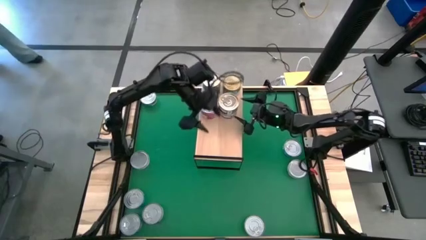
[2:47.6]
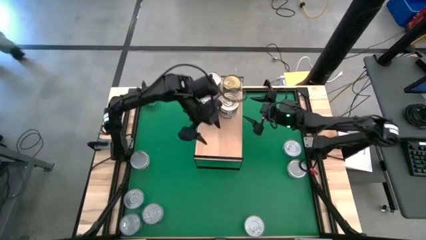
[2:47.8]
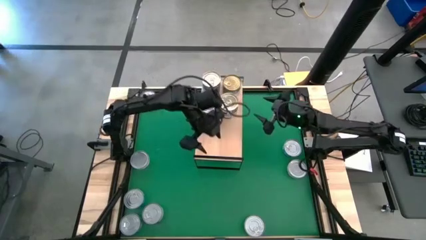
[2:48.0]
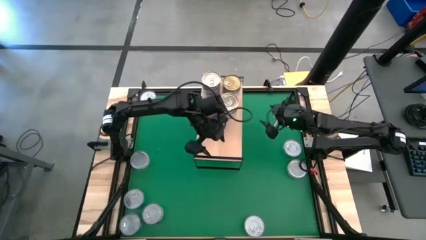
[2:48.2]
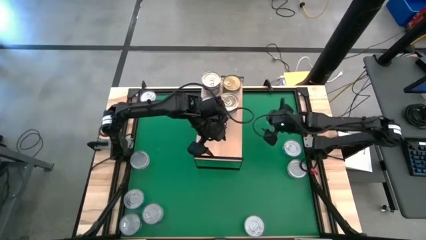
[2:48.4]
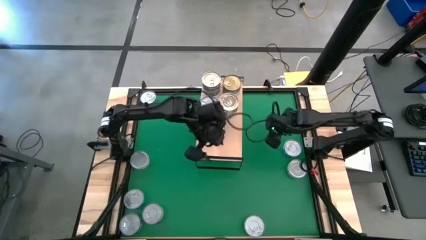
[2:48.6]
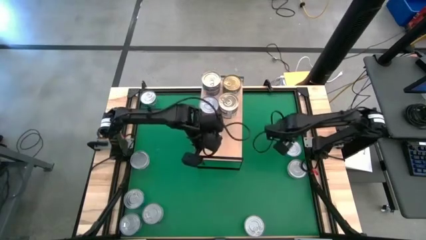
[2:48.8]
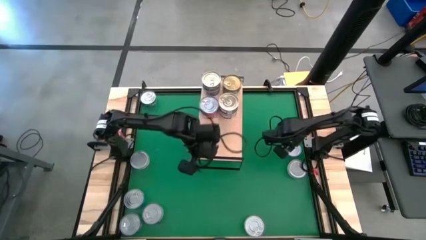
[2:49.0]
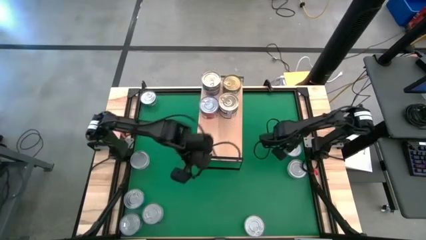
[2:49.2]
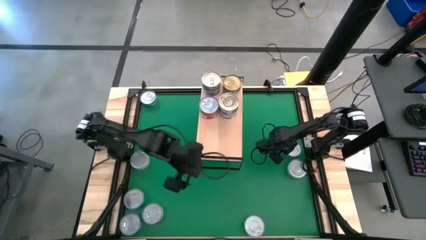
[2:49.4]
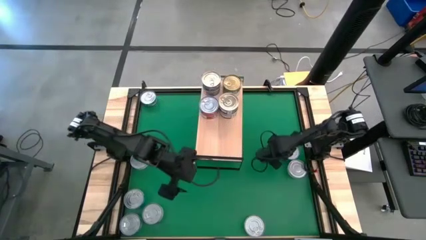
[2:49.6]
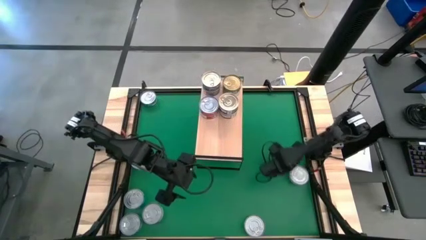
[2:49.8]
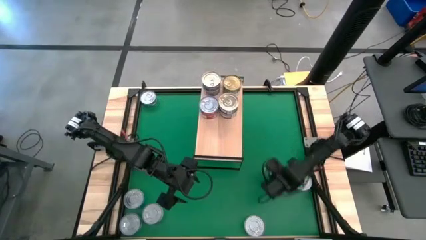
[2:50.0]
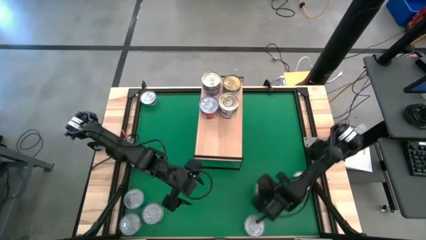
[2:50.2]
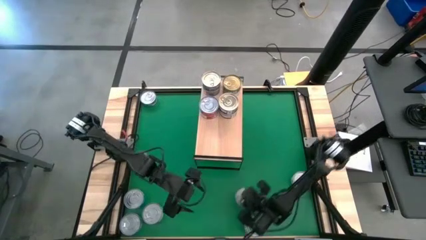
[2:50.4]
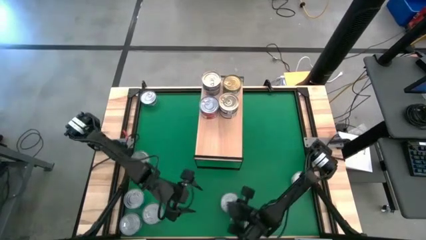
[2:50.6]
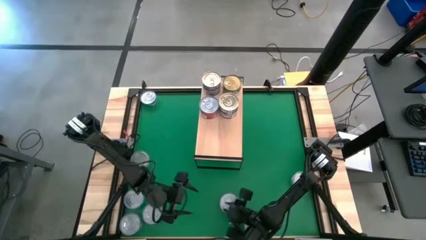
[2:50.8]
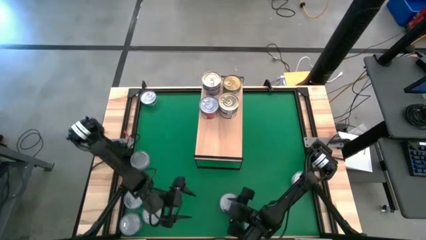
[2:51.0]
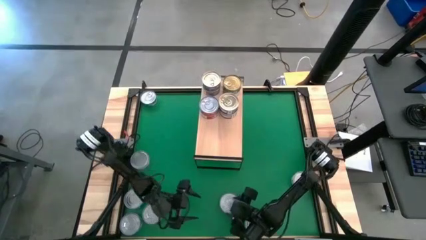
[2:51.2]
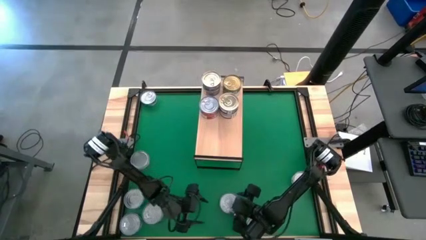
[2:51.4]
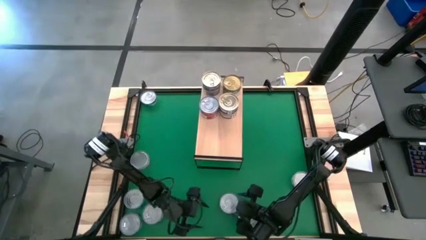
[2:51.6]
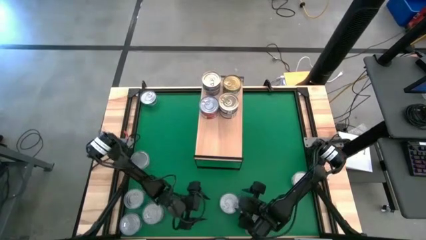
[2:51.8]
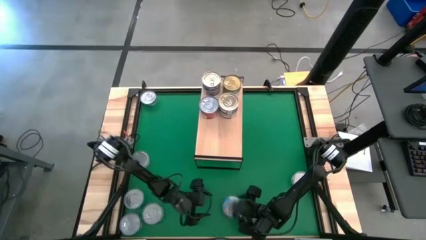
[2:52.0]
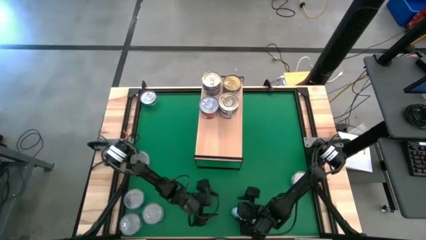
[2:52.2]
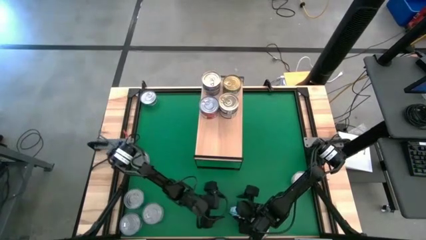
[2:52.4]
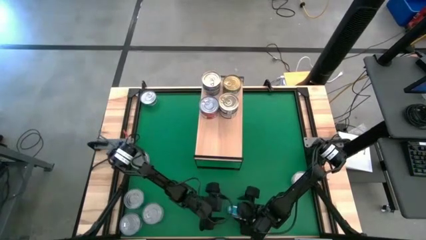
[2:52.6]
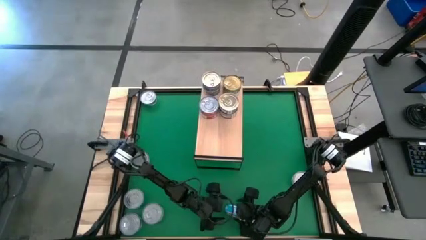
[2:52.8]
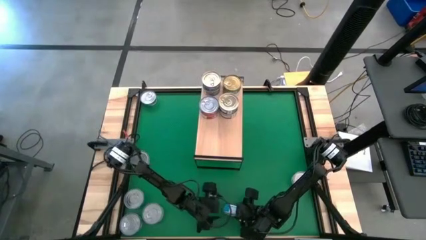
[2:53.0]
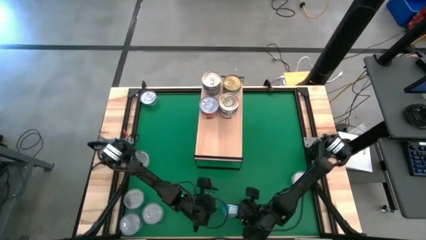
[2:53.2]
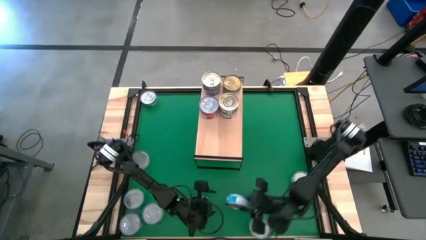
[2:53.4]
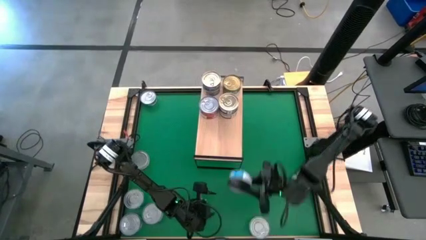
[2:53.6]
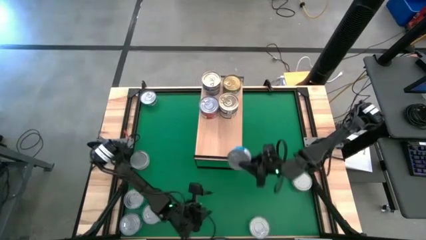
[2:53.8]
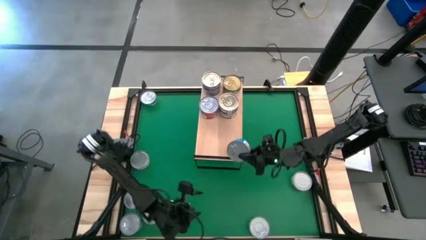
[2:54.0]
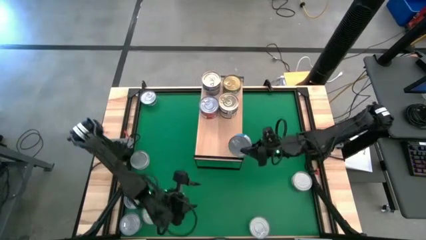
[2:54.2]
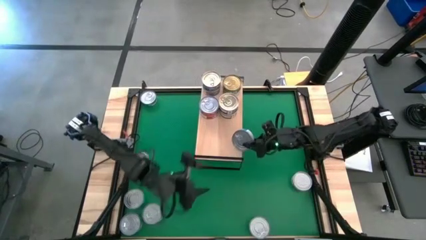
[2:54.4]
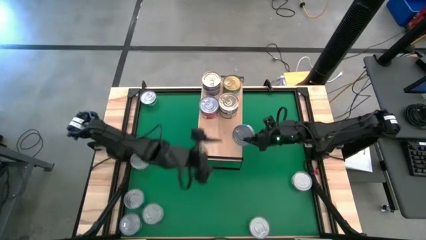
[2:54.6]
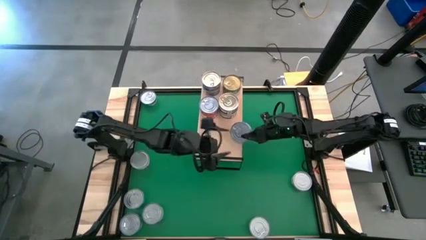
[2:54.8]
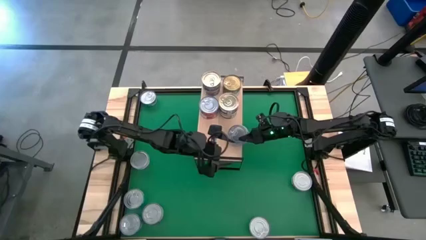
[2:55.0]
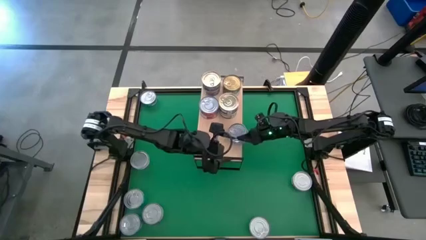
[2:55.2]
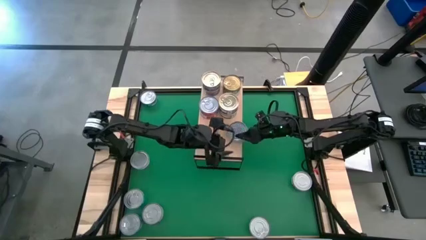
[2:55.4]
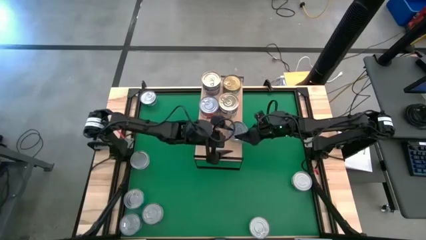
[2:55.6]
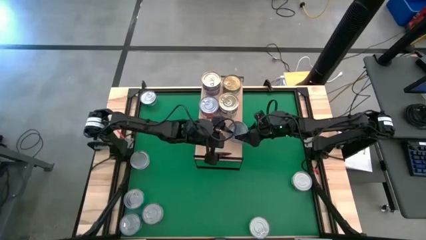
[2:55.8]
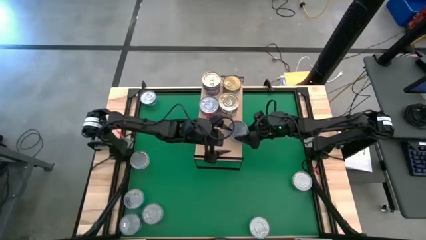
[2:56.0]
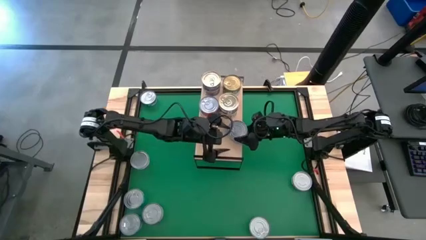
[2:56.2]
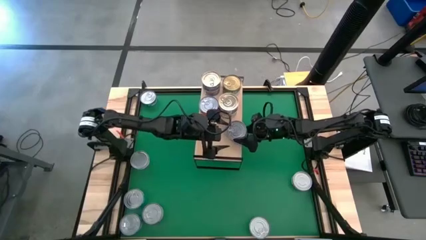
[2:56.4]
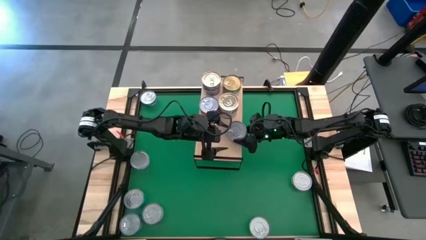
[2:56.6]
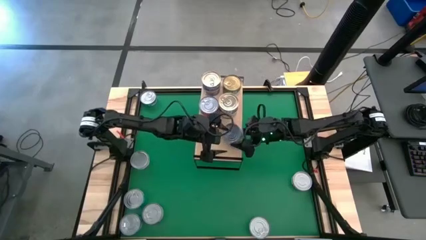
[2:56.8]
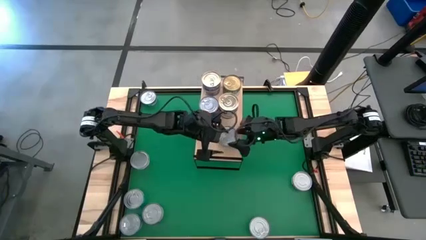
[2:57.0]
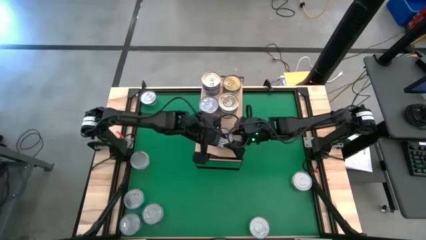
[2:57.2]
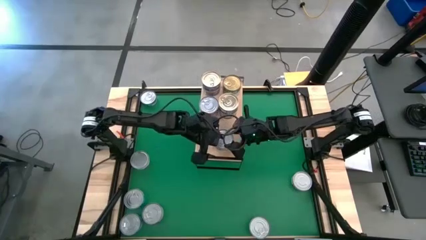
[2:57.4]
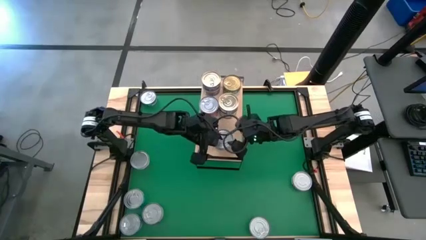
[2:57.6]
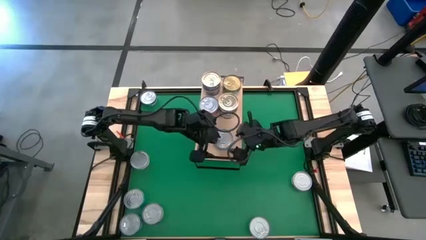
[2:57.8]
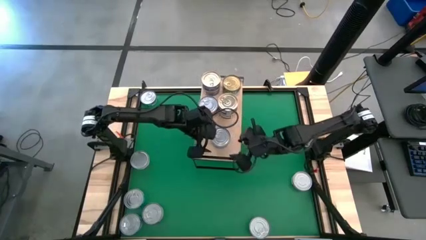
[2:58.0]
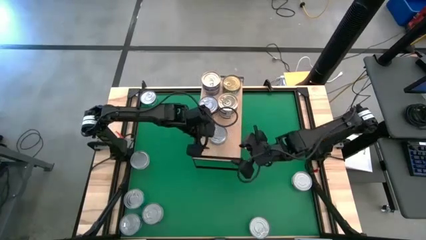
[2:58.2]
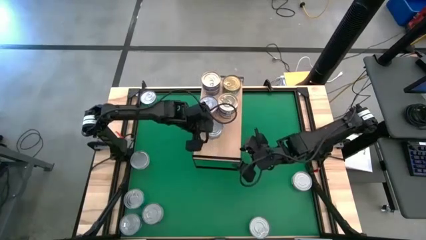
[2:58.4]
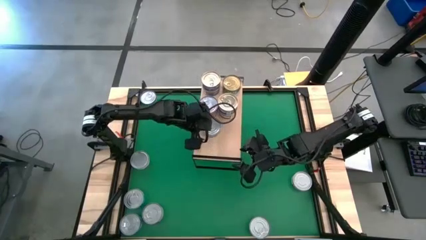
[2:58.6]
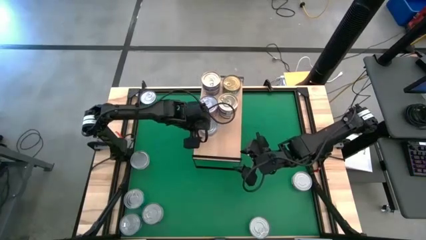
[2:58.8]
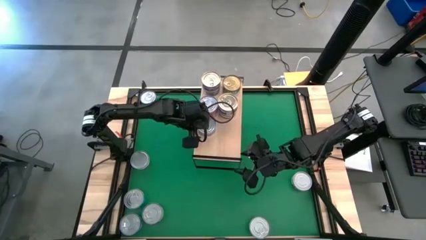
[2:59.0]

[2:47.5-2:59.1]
Task: Stack canned seafood by type on shelf
Put the yellow blue tuna can on the shelf

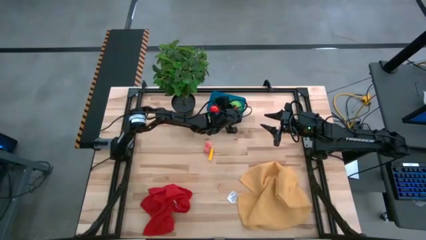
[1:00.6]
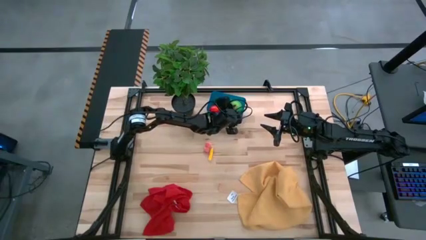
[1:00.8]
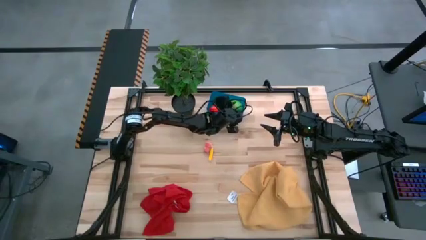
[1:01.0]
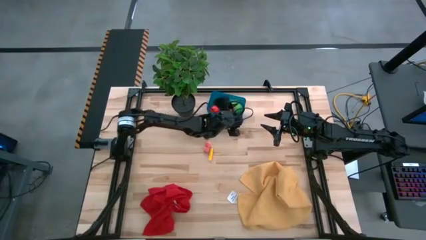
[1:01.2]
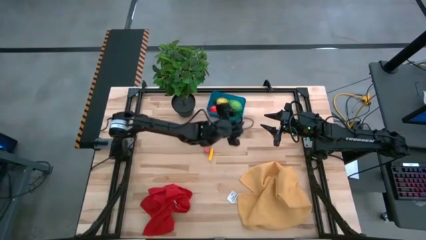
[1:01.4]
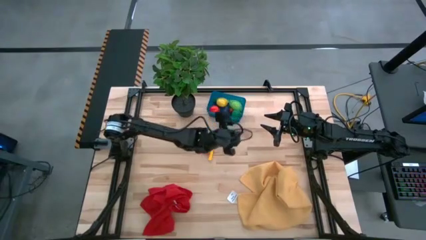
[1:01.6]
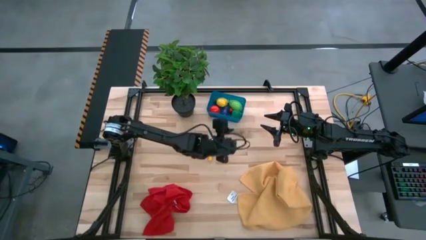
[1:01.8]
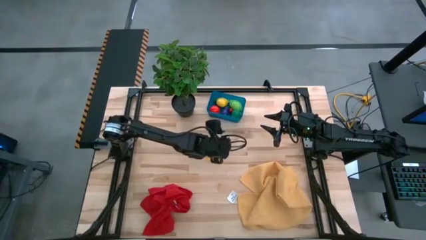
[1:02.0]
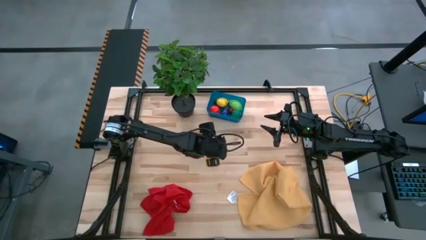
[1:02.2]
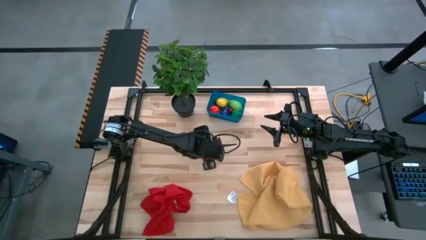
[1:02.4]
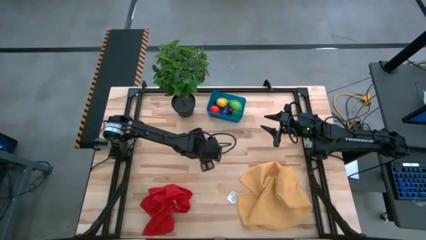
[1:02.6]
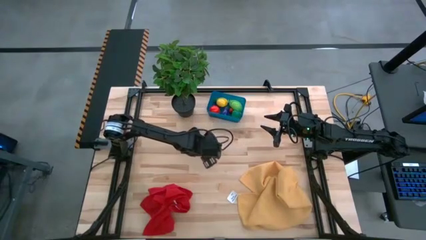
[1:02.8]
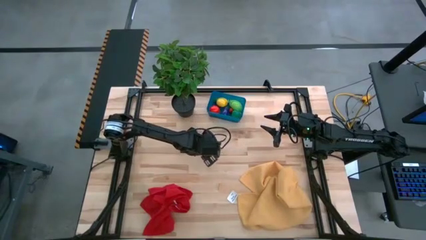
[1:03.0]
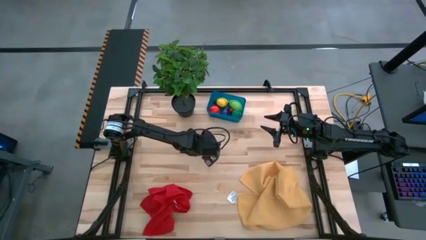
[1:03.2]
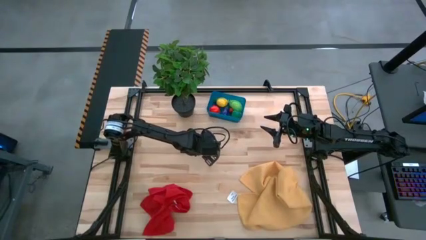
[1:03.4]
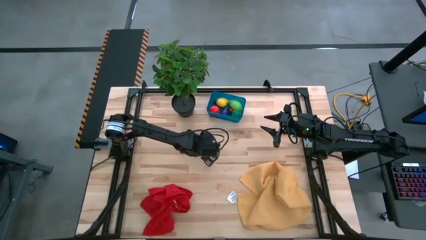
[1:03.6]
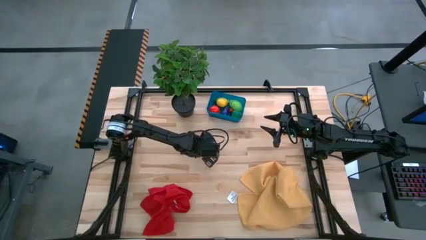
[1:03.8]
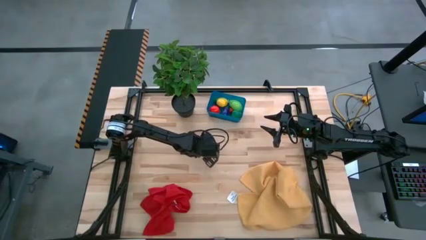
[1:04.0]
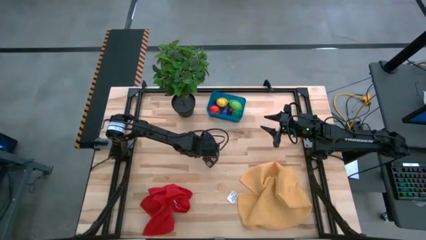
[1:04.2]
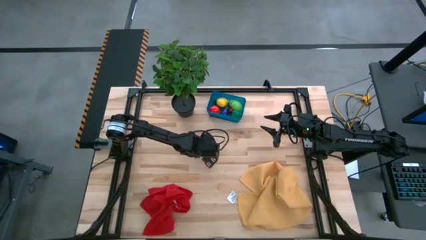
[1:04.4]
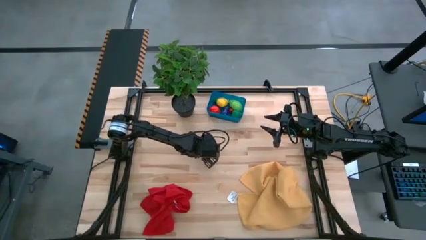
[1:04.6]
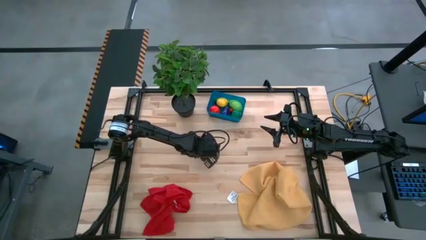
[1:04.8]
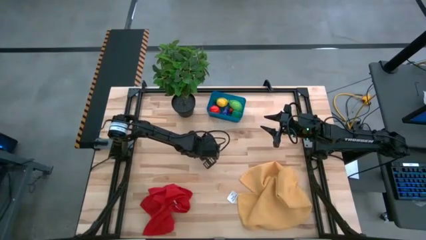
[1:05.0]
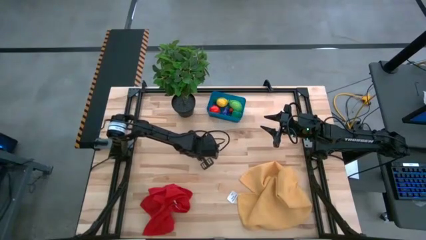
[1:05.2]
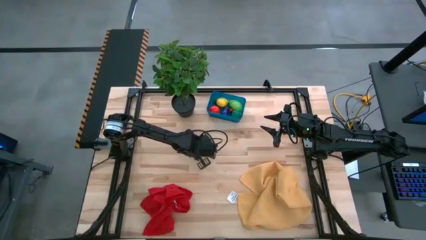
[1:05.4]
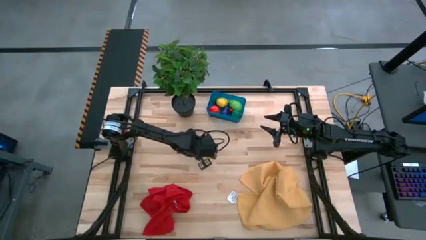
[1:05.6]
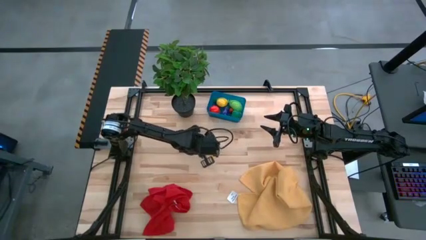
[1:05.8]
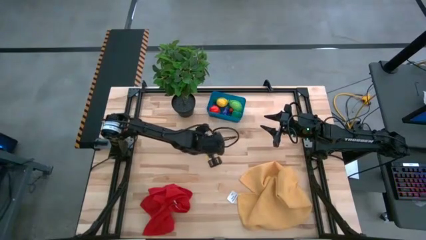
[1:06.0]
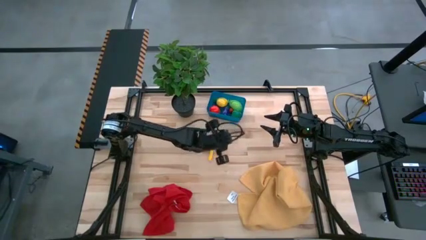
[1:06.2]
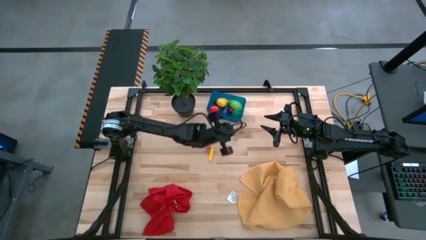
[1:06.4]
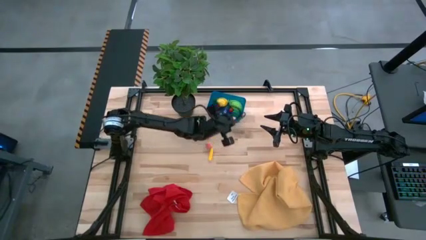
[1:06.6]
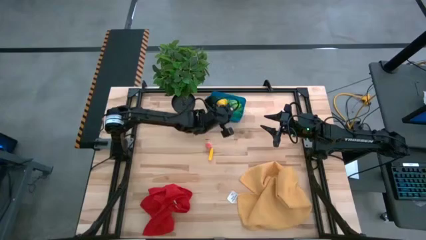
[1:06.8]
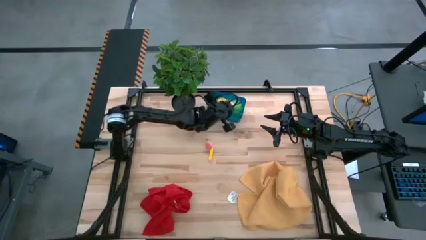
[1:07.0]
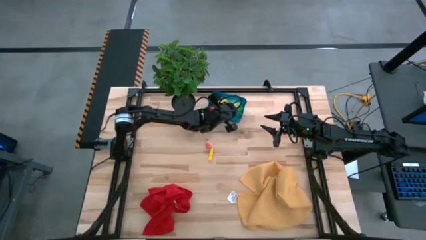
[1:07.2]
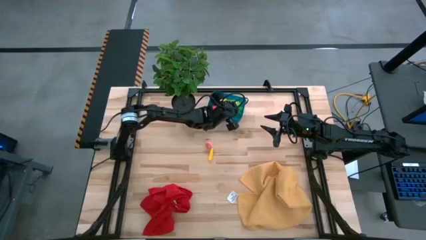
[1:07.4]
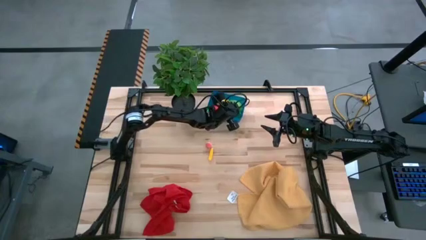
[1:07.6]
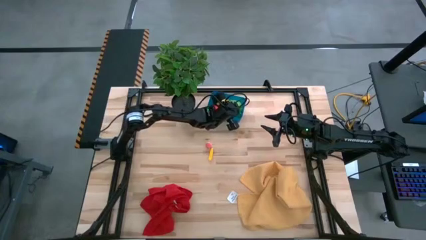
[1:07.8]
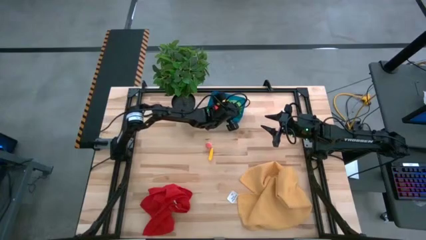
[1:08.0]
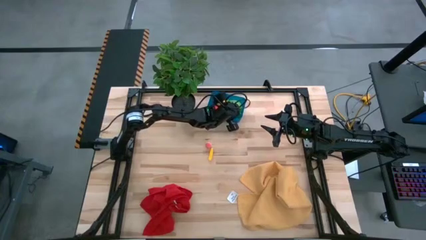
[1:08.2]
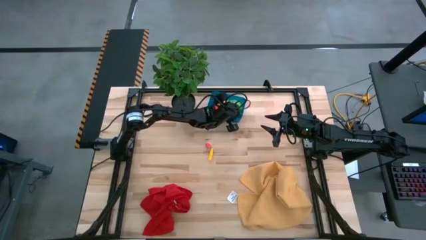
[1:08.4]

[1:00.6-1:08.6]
Task: Pick and placing Produce into tupperware
Put the bottom pink peach into the blue bin
